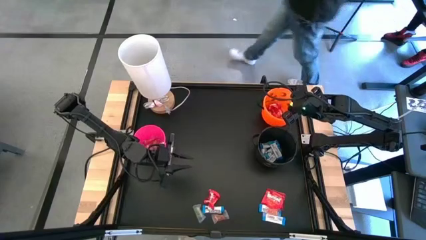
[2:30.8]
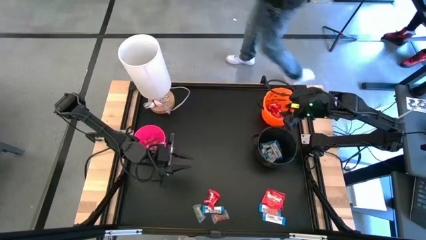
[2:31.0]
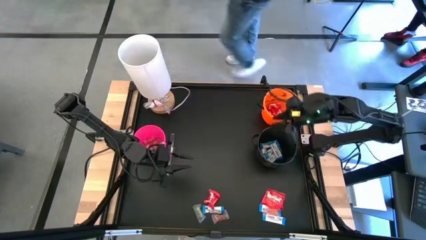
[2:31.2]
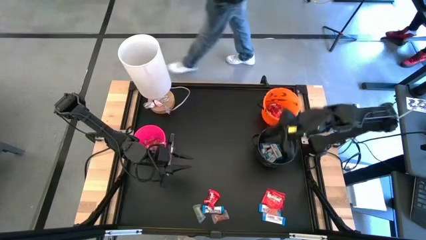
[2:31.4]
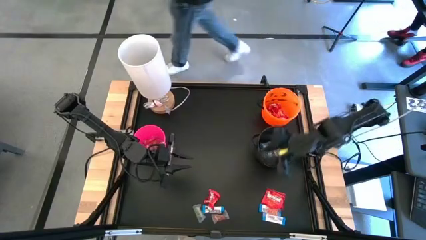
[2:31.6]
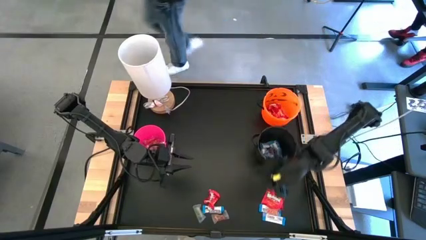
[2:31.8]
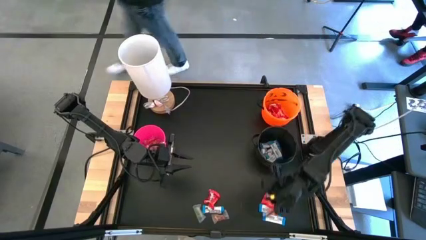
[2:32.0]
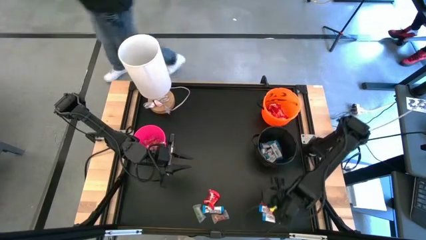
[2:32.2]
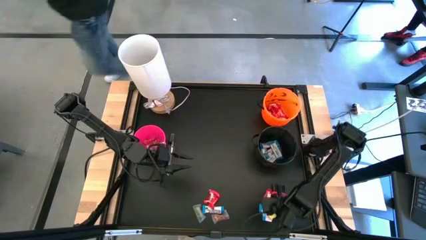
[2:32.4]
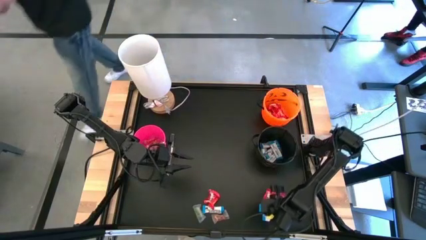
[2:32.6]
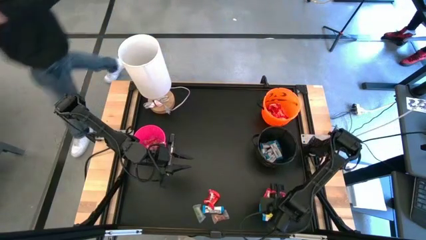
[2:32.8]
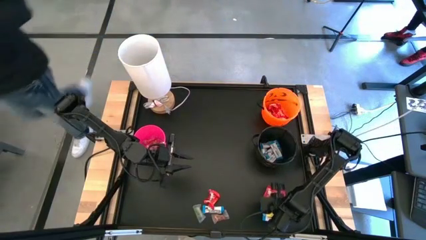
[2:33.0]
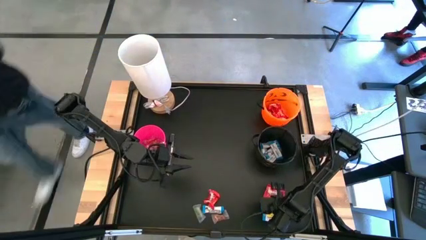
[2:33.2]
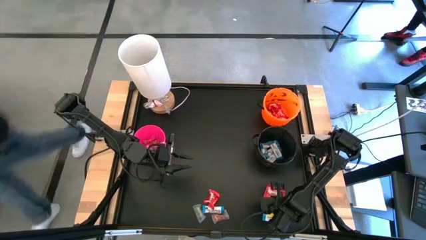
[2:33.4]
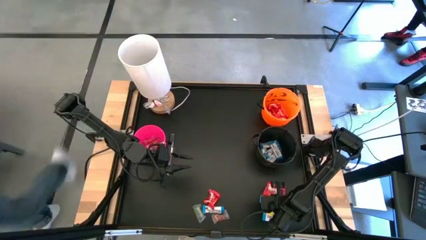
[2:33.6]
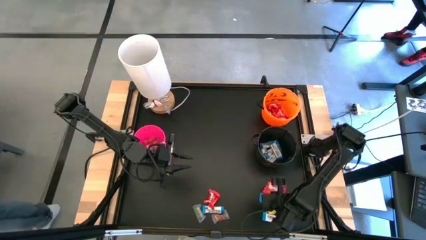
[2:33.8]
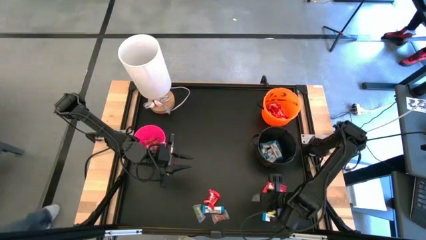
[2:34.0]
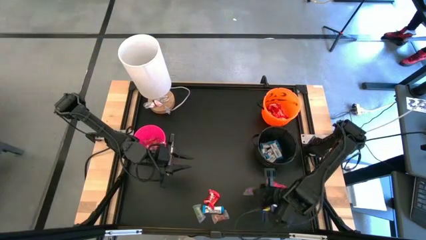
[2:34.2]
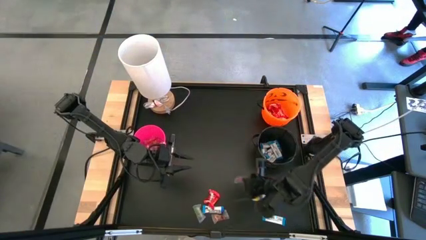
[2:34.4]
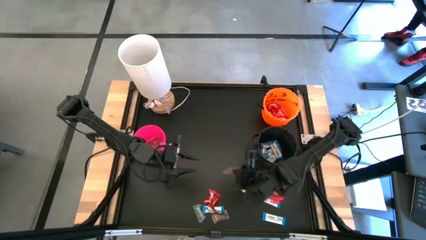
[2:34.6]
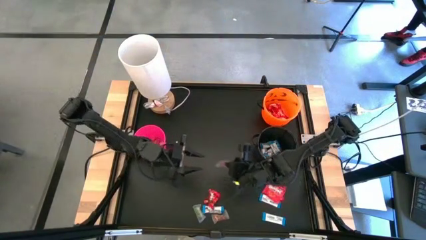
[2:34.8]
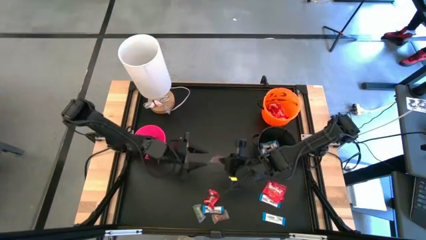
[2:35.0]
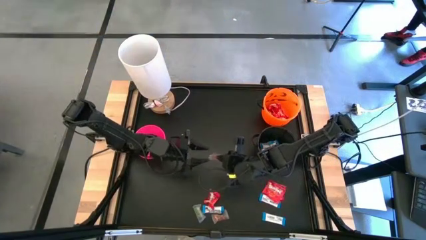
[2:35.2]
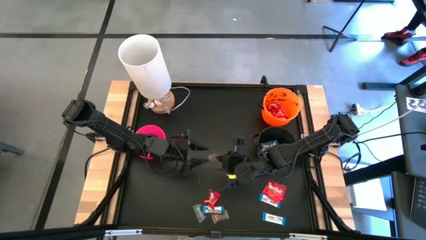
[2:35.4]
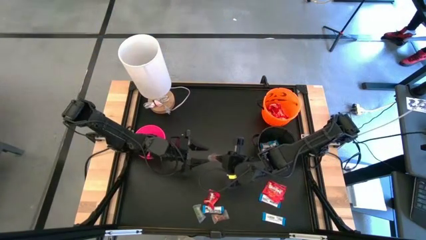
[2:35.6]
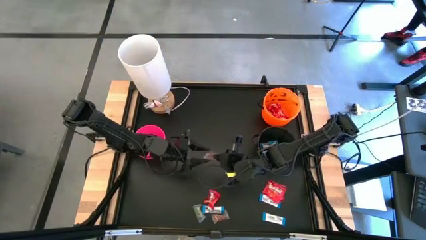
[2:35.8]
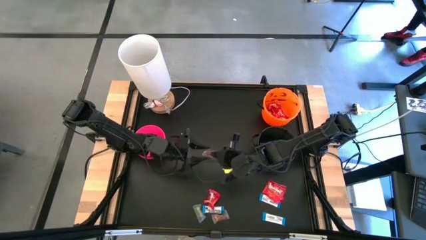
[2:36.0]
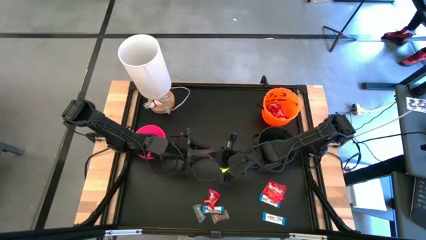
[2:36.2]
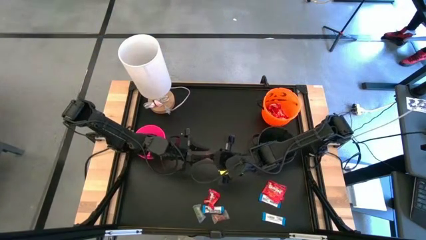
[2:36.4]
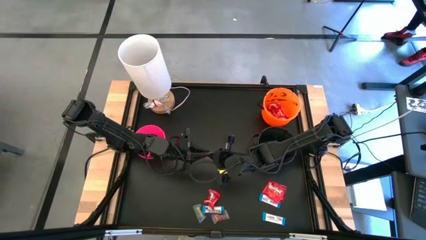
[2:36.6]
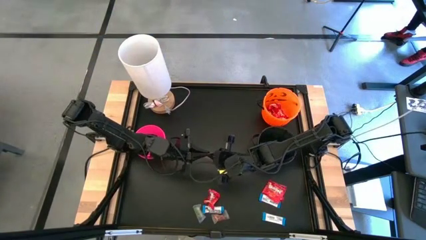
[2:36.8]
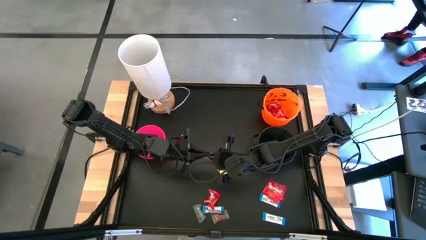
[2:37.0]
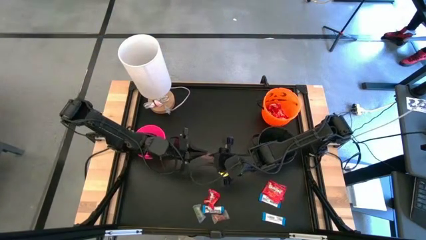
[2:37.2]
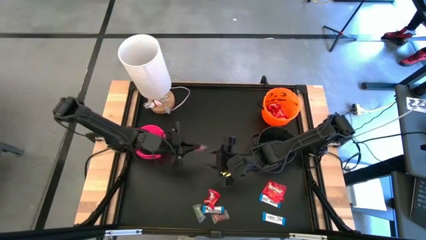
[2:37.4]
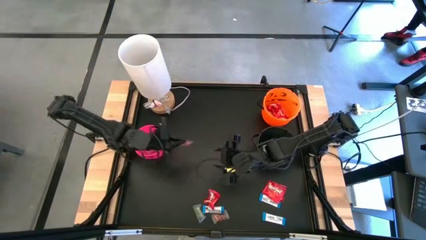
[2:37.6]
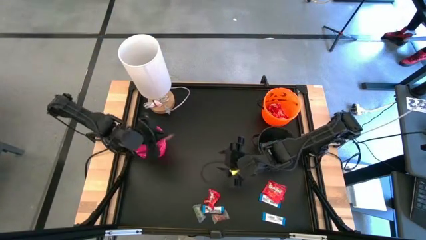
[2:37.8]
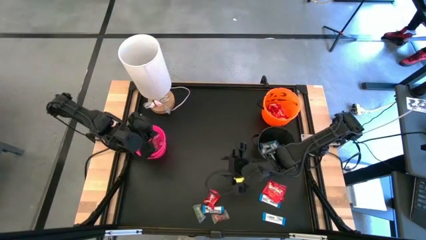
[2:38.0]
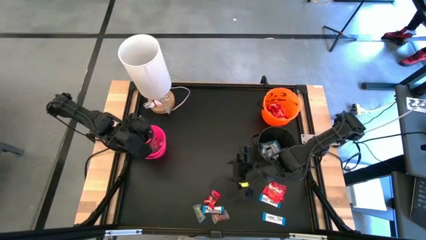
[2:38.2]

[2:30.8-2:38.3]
Task: Sort candy
Put the orange gummy into the pink bucket

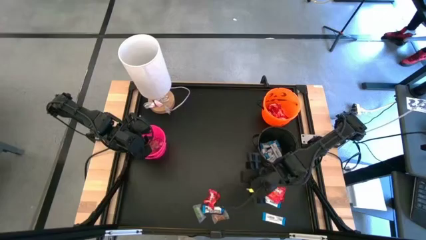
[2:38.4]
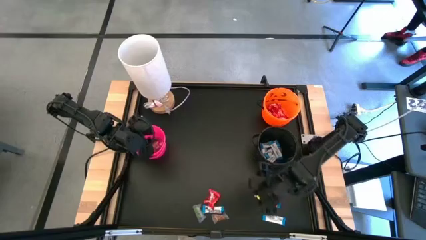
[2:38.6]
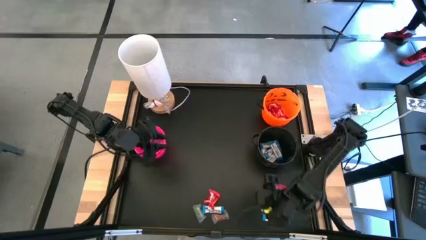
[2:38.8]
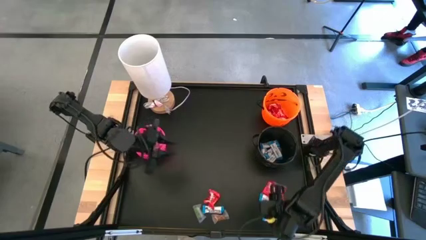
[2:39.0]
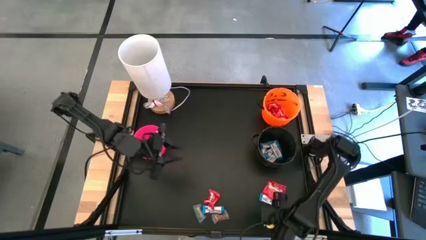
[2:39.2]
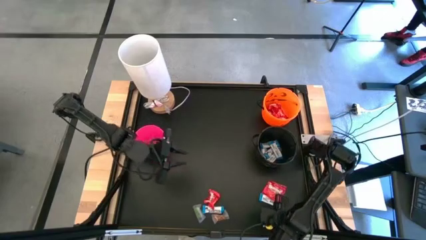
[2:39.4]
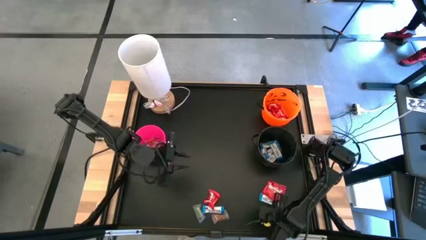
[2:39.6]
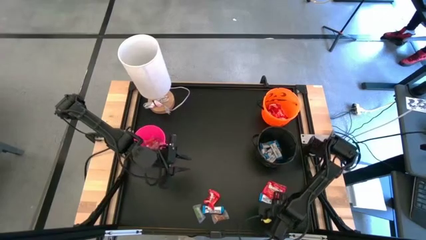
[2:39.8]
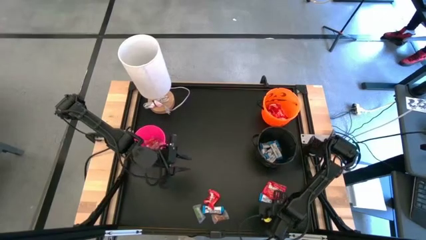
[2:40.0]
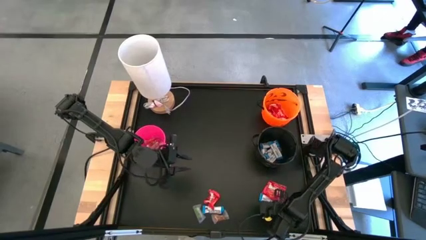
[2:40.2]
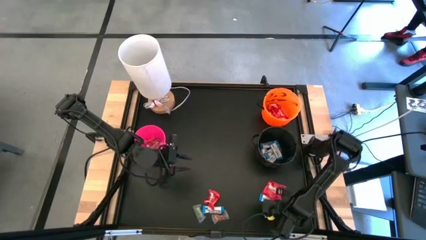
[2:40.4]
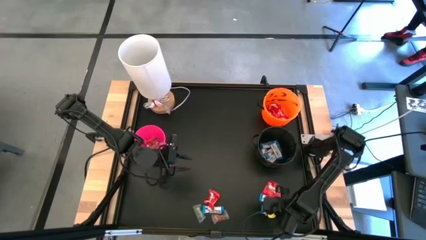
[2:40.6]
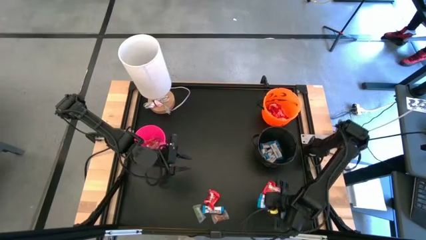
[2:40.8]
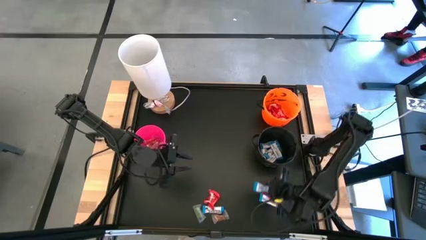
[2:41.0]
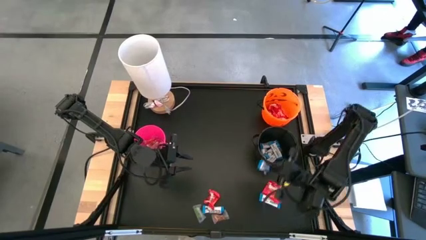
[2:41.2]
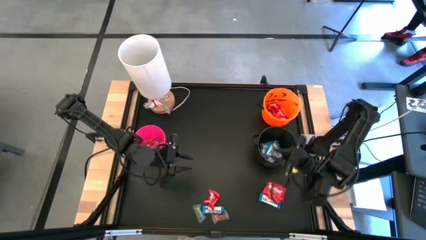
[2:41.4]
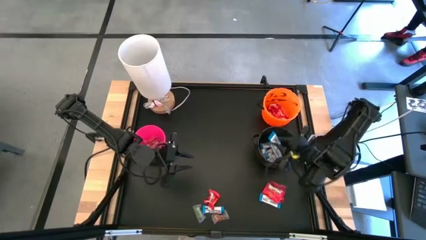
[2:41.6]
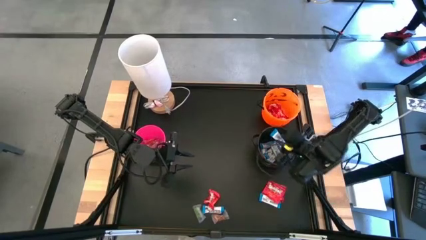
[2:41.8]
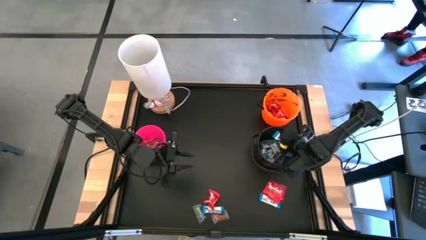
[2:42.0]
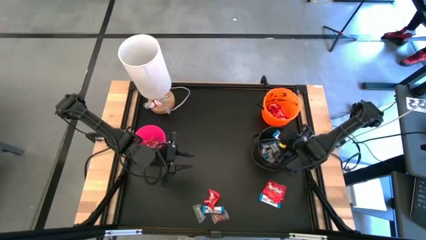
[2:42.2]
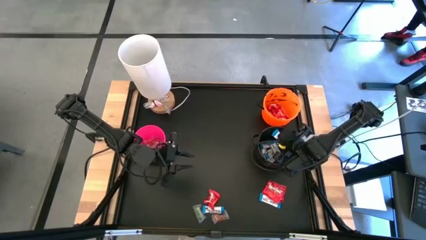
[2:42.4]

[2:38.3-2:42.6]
Put the white chocolate into the black bucket

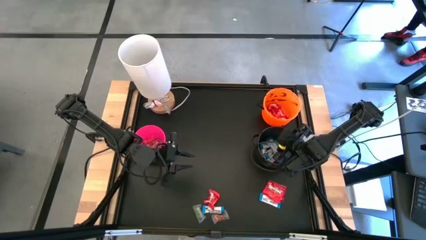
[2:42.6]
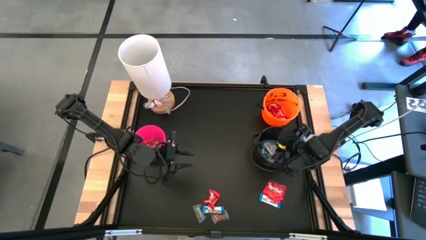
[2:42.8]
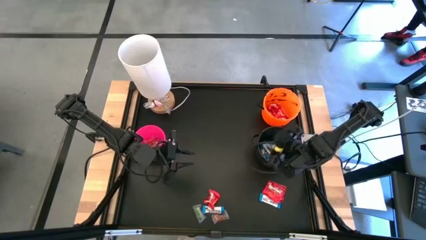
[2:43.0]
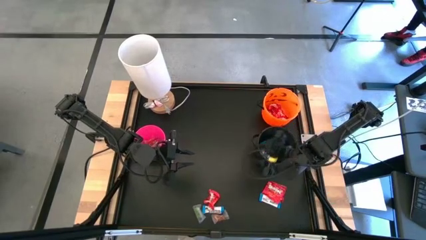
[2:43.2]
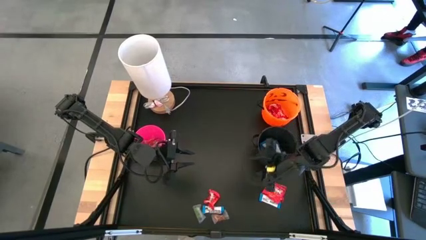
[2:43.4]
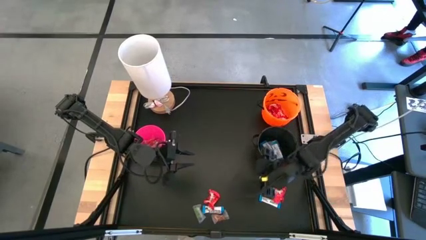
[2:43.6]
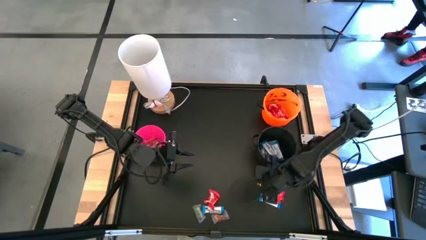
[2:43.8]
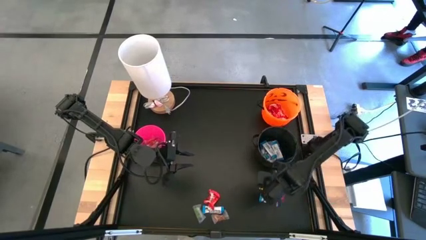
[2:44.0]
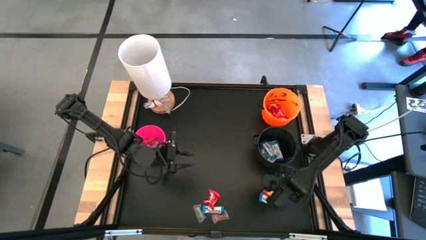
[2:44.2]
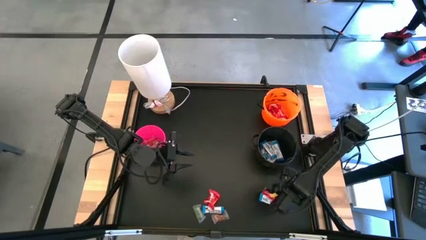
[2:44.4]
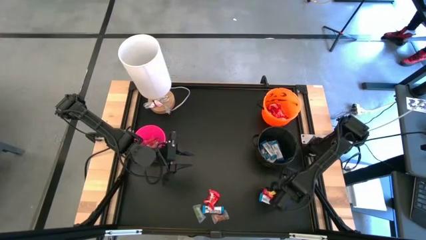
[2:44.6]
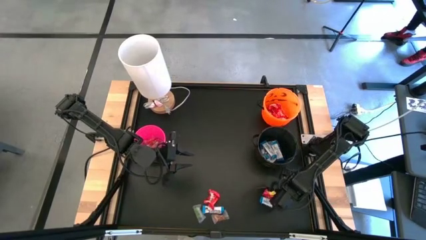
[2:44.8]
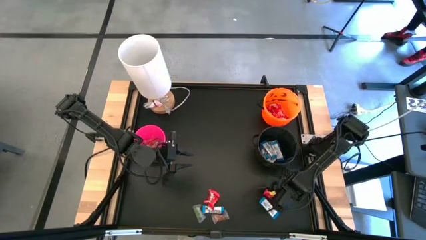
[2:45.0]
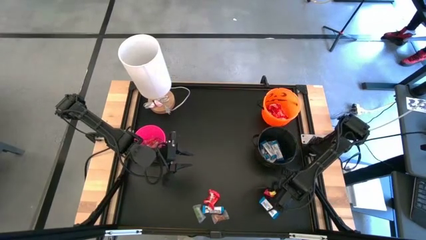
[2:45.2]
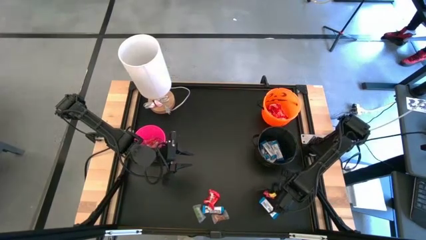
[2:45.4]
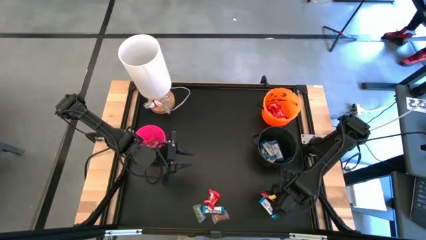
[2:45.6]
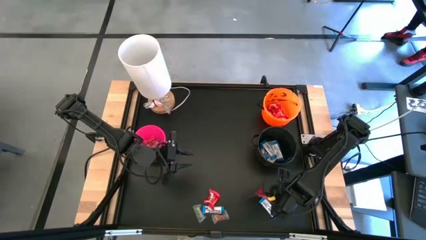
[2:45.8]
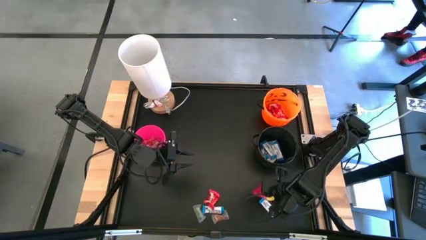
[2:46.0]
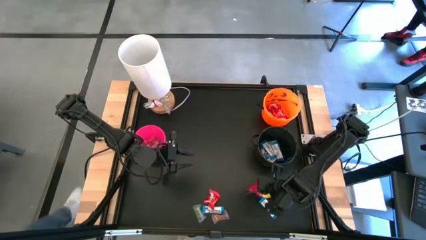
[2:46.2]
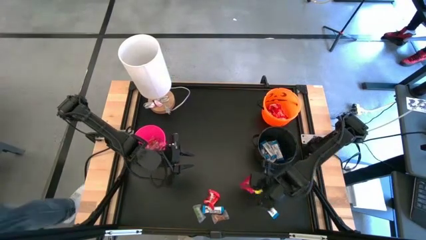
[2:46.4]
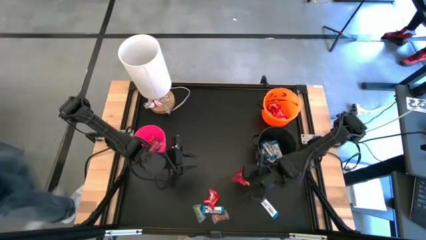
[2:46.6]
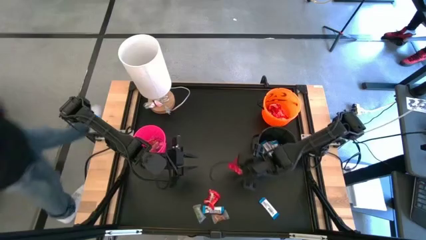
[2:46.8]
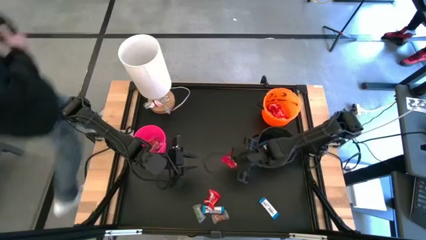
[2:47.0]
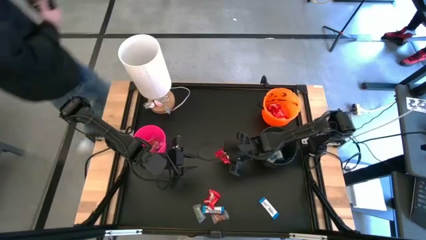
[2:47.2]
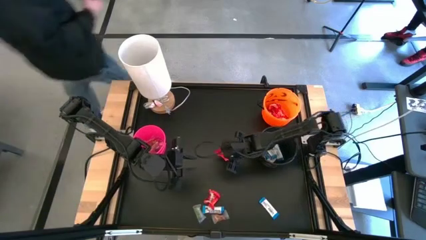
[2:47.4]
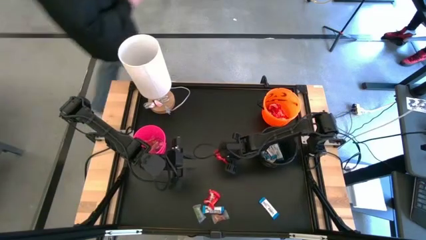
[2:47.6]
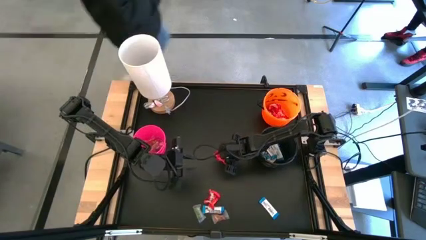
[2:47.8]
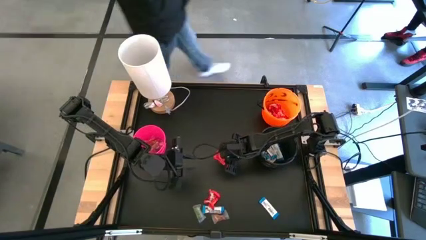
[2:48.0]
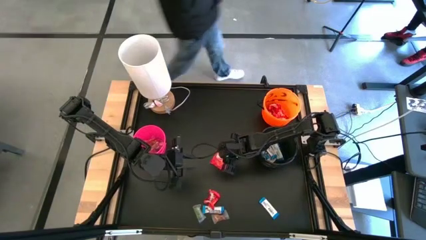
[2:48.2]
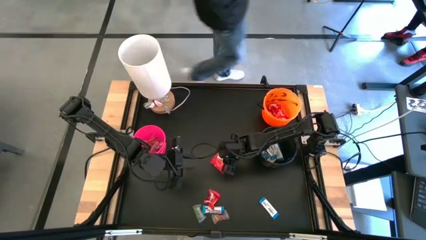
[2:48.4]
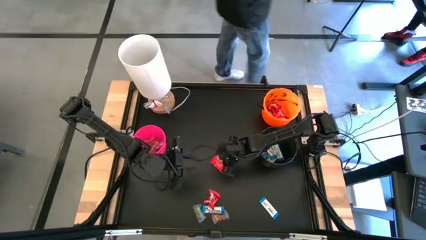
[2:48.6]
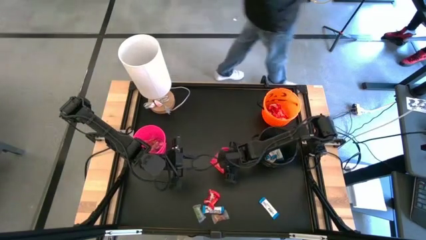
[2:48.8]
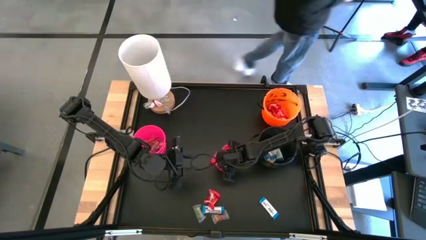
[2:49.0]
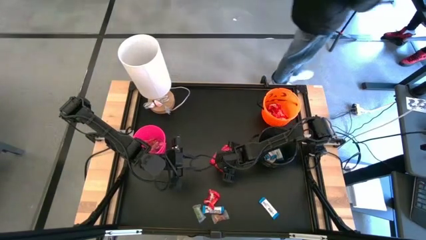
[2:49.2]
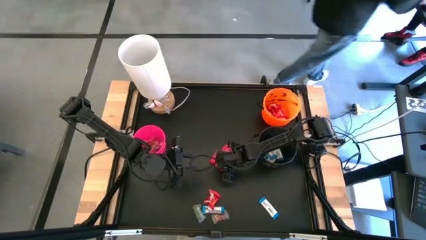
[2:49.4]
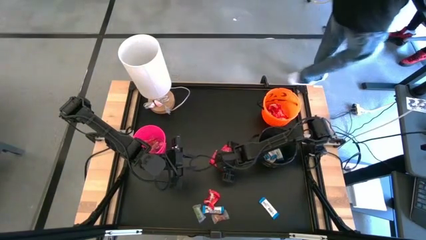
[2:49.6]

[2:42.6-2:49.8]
Put the red candy into the orange bucket
